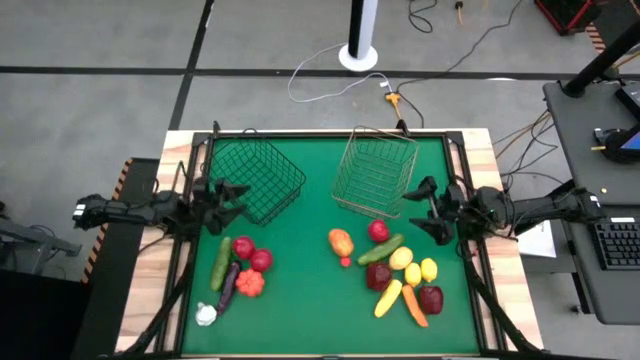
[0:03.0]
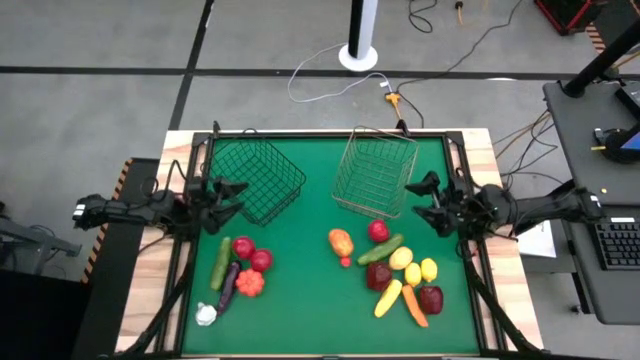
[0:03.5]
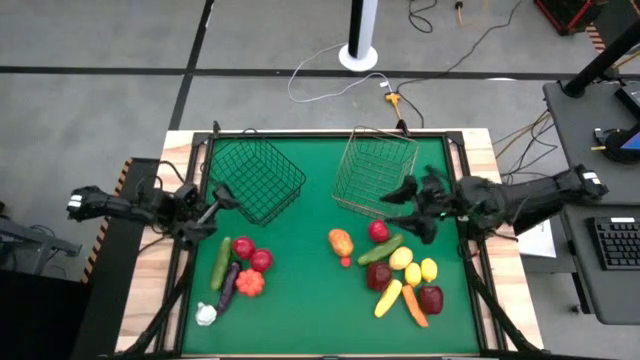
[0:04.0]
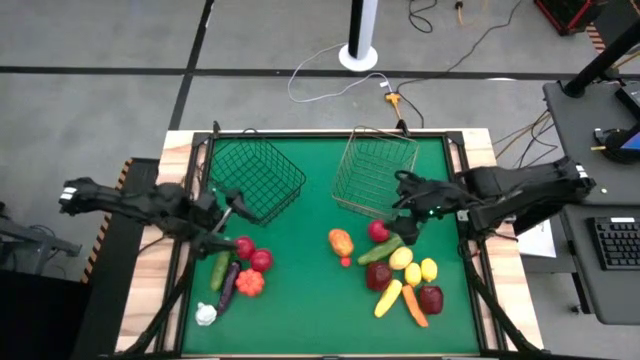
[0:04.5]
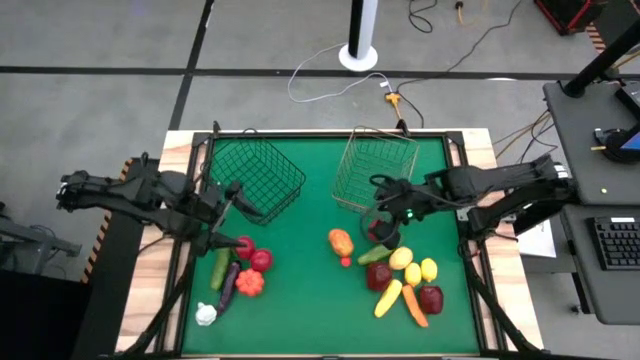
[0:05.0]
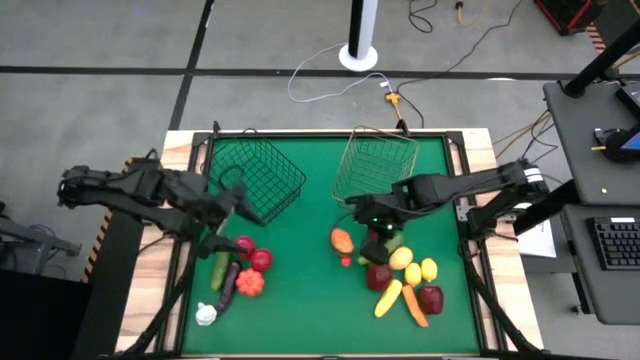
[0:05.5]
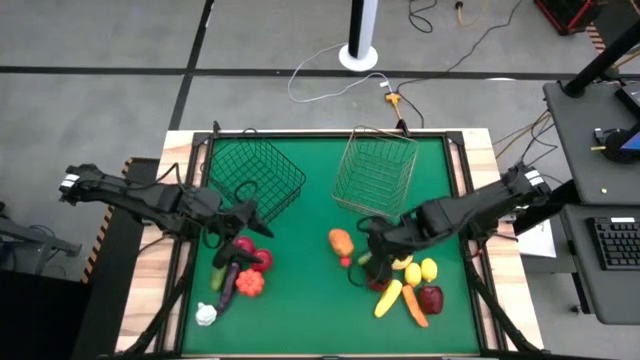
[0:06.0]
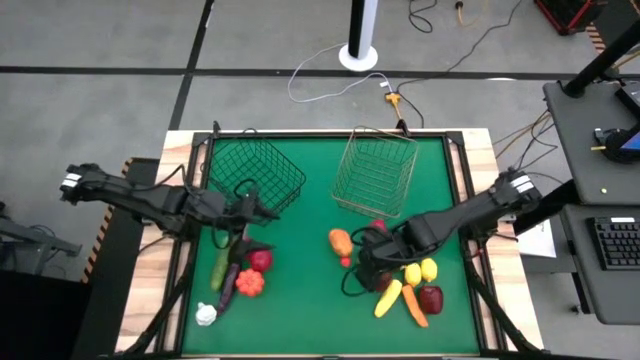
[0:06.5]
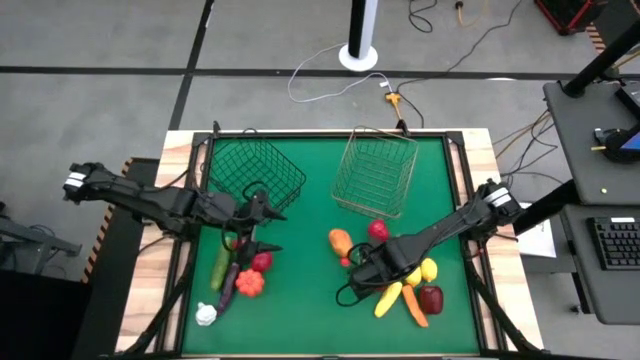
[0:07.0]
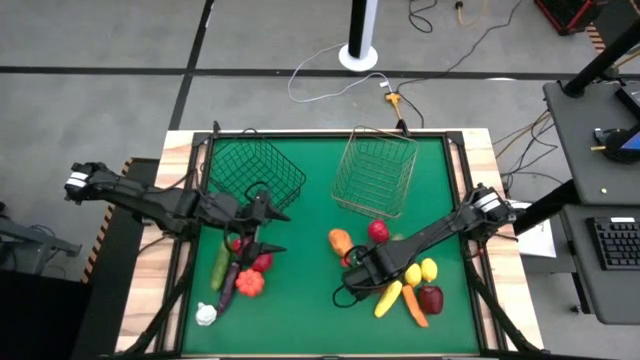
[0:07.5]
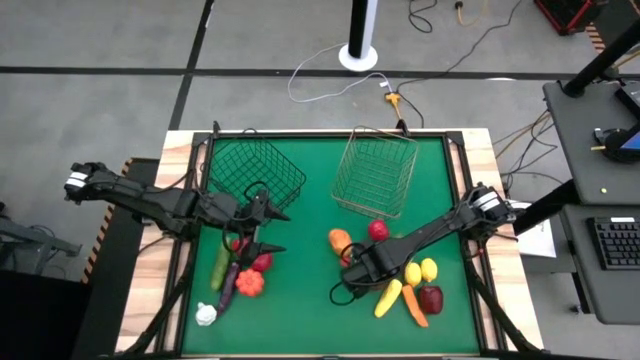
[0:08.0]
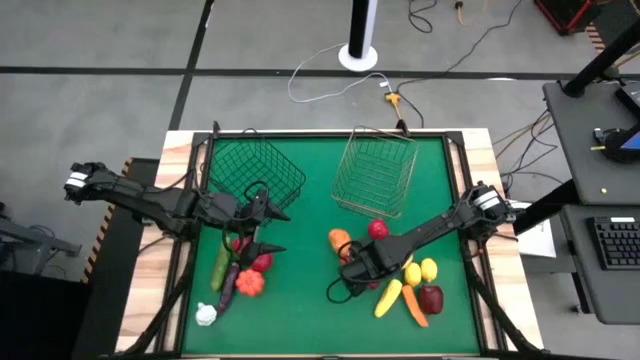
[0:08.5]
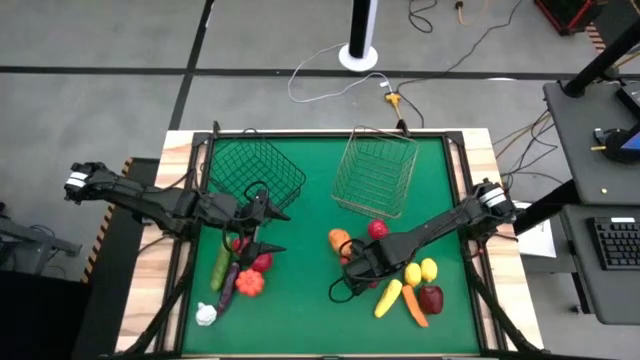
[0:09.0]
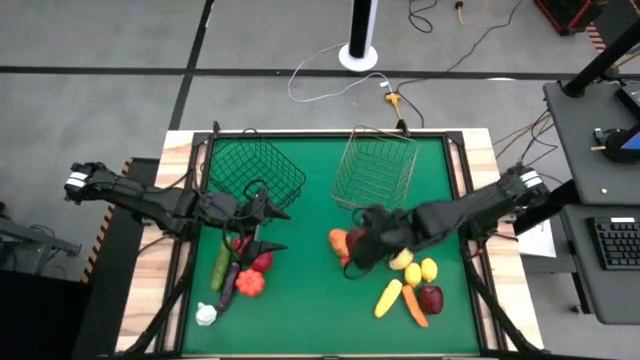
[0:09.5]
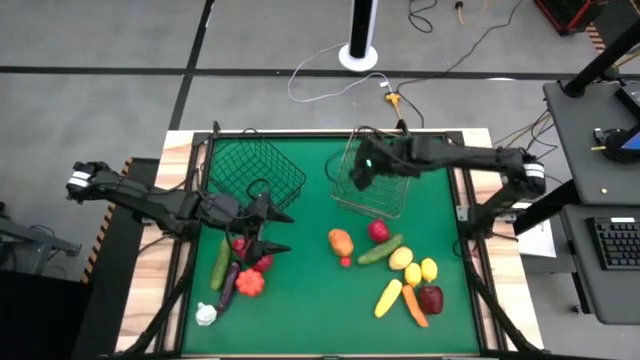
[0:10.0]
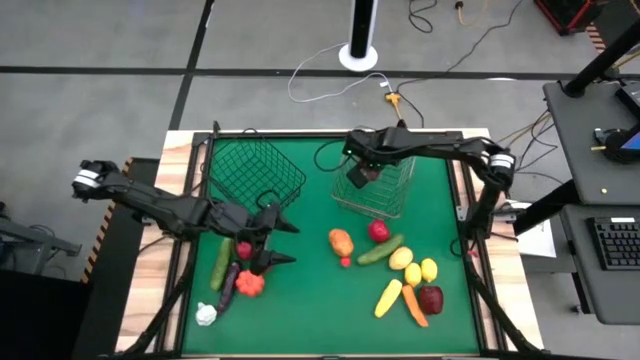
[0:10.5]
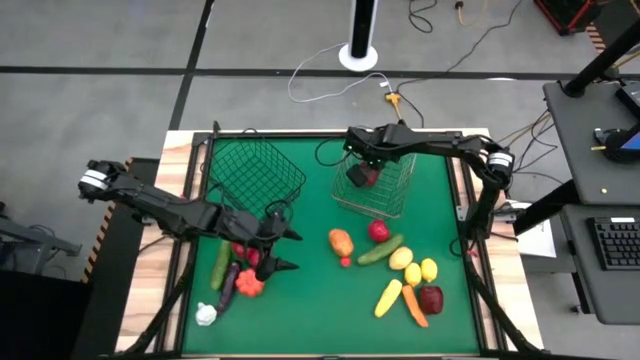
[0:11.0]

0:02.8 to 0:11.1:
Task: Sort produce into baskets
Put the left apple into the gold wire basket

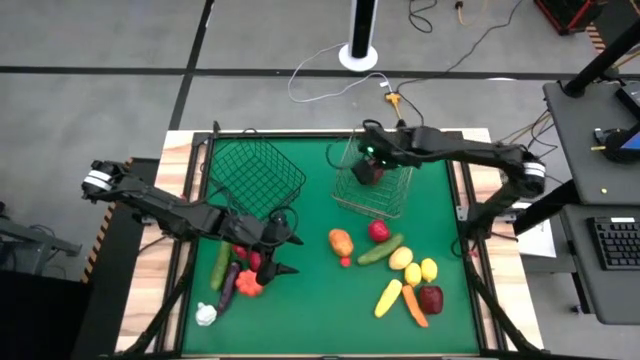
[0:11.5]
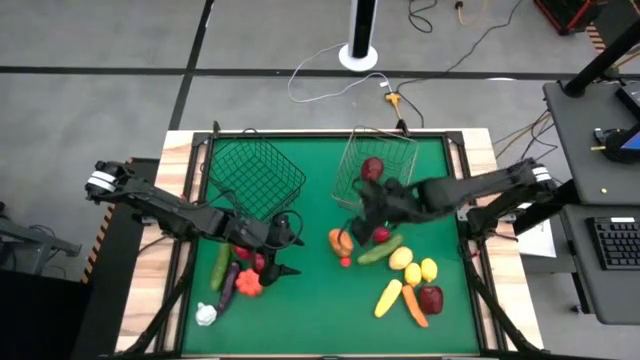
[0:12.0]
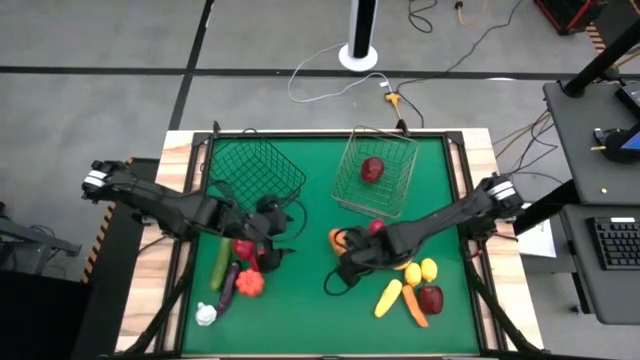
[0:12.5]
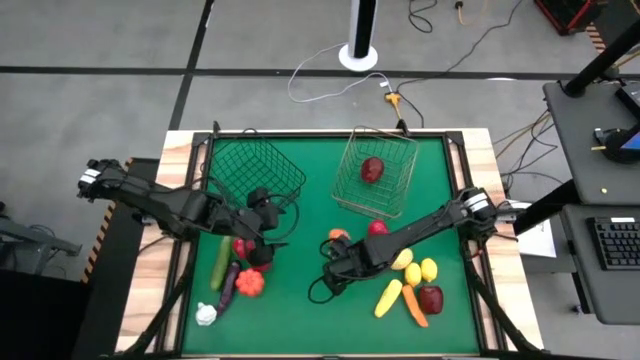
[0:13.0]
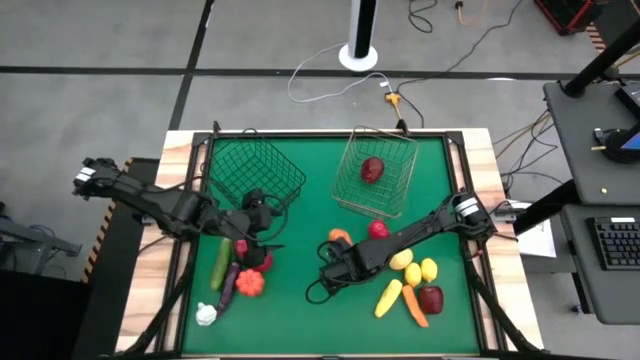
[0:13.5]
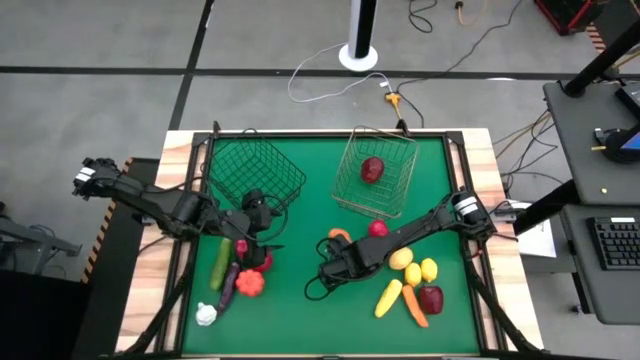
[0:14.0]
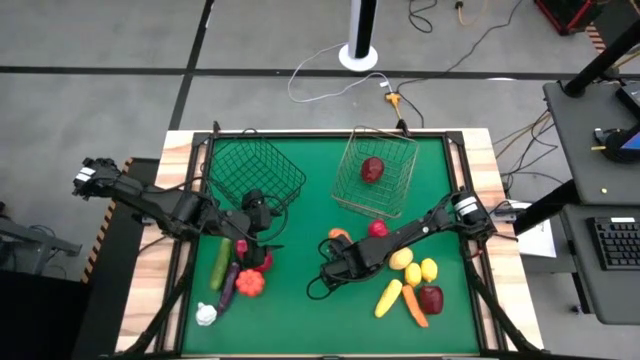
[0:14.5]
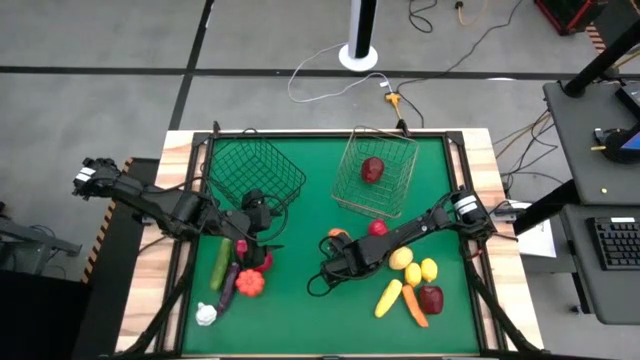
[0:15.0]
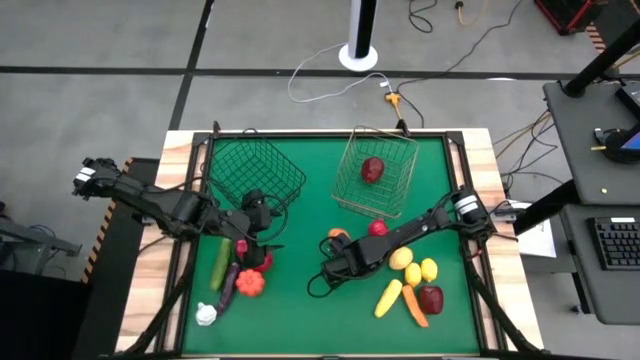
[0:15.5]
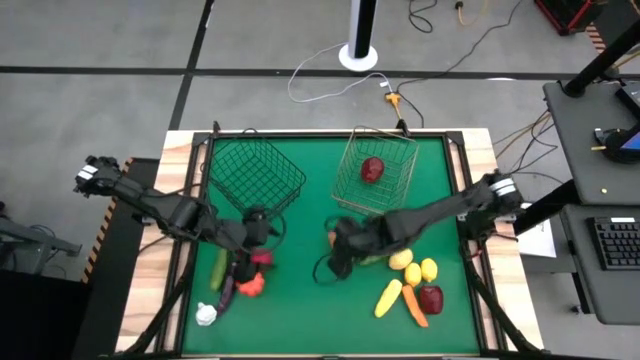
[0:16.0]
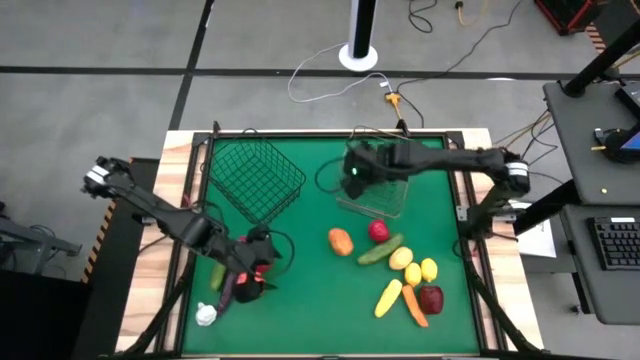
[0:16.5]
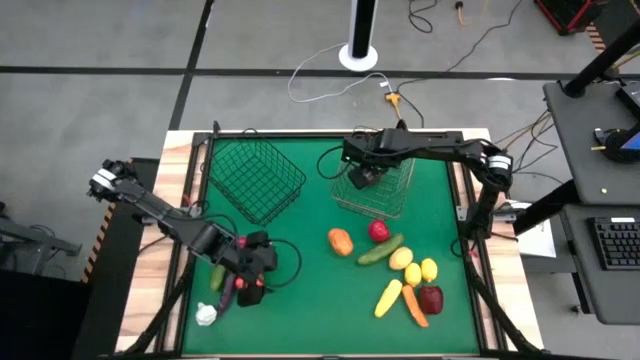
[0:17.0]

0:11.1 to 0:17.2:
Put the small orange tomato into the gold wire basket

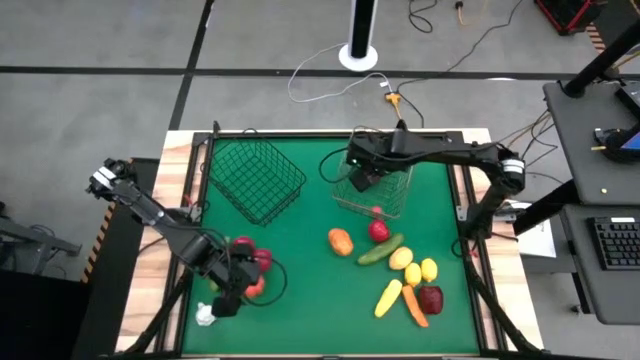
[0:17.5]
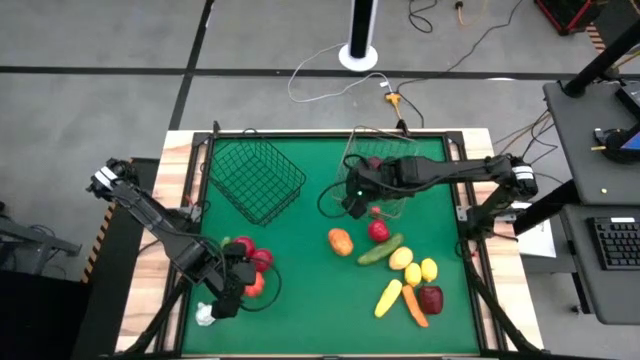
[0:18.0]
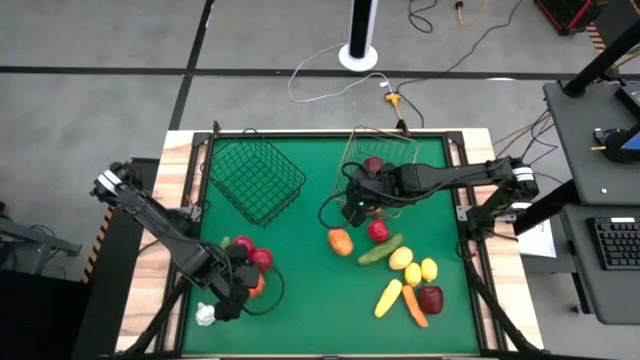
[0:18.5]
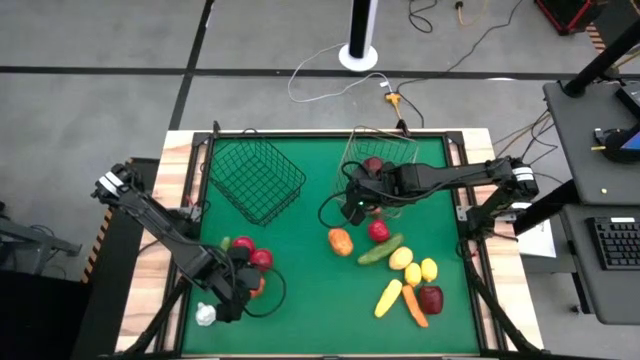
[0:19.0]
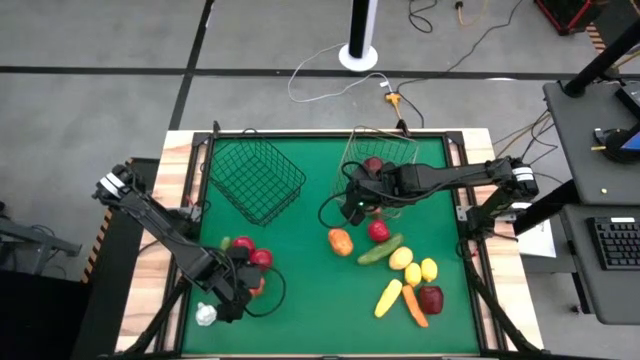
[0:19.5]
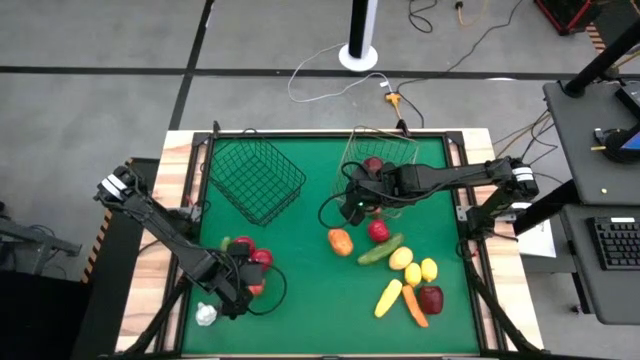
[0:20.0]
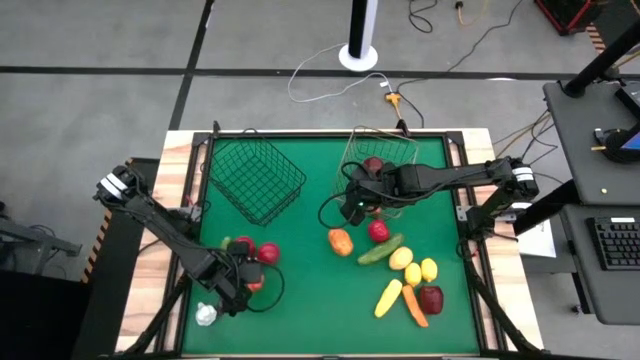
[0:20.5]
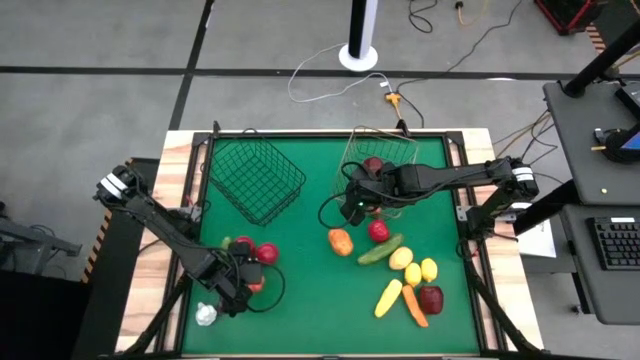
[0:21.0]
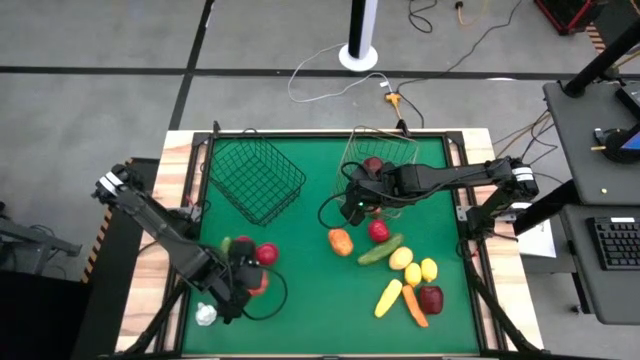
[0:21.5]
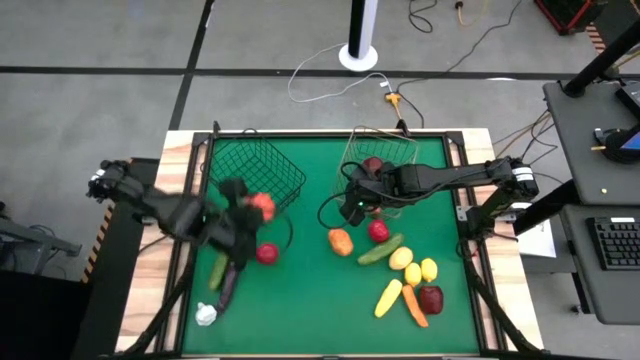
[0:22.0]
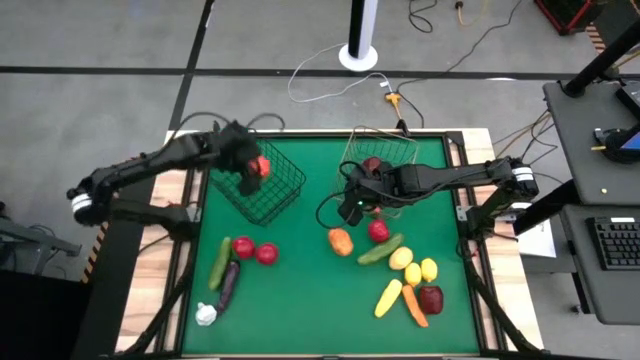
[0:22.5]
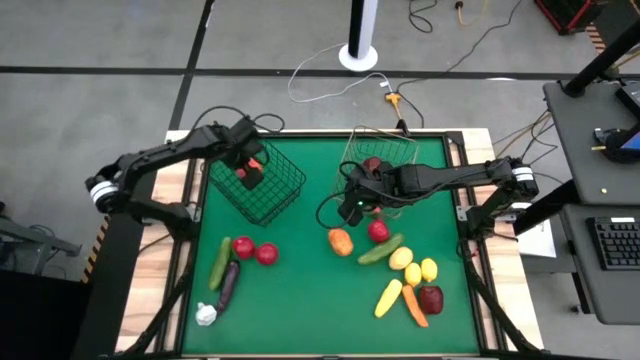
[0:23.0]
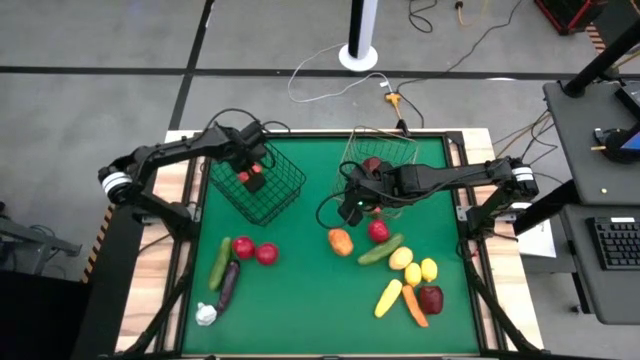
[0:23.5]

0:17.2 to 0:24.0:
Put the orange pumpkin into the black wire basket
